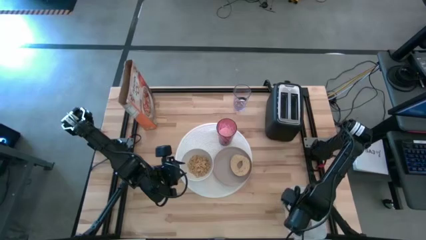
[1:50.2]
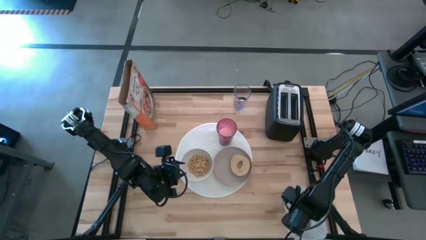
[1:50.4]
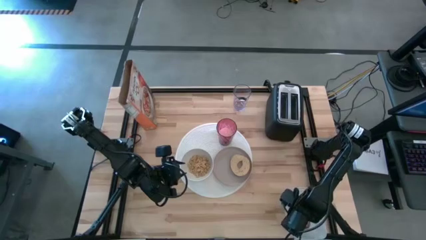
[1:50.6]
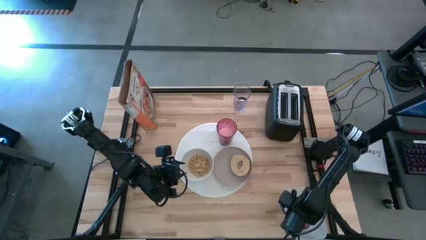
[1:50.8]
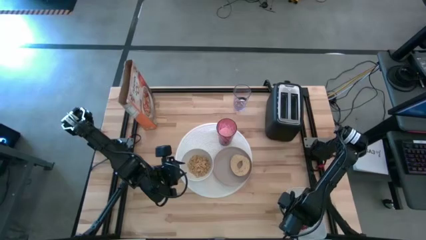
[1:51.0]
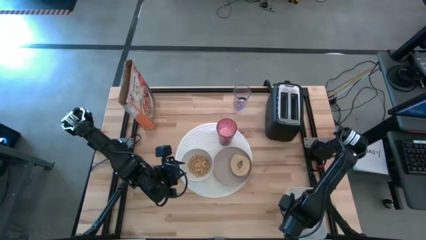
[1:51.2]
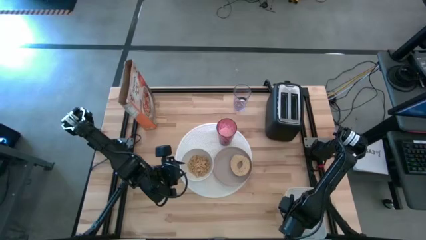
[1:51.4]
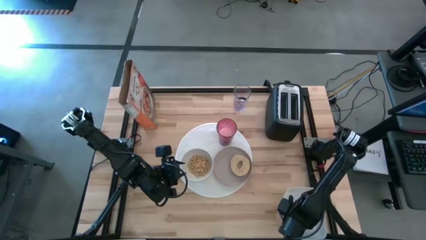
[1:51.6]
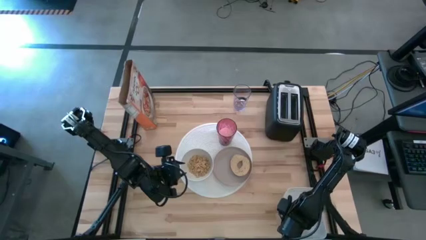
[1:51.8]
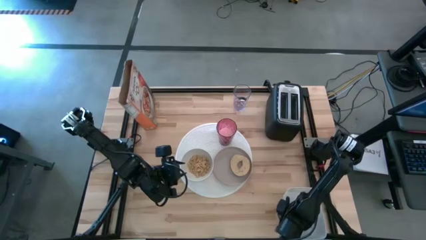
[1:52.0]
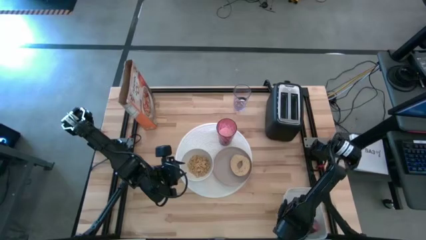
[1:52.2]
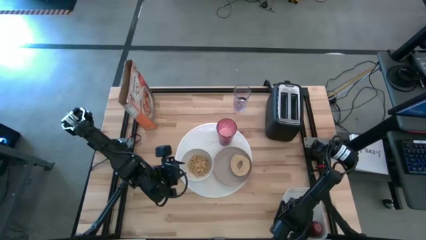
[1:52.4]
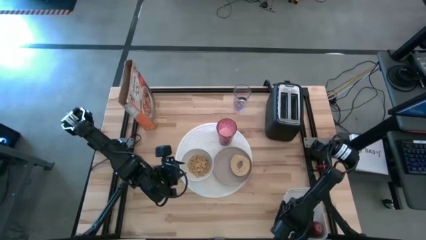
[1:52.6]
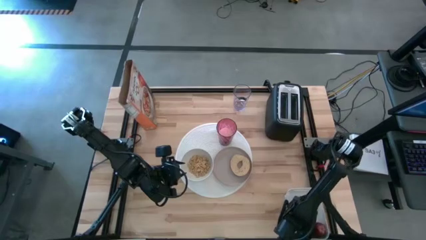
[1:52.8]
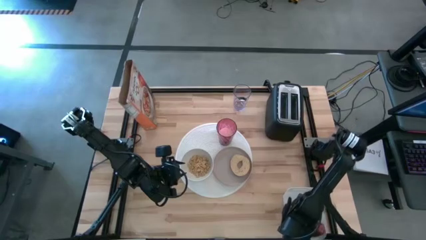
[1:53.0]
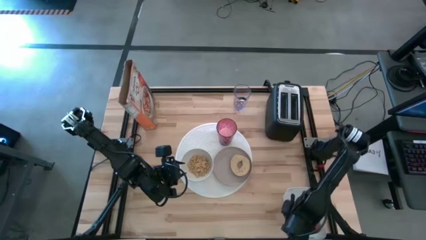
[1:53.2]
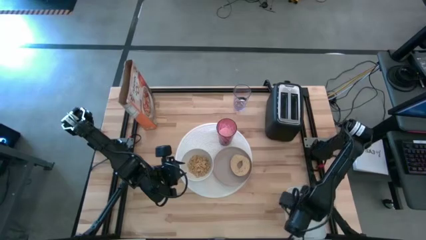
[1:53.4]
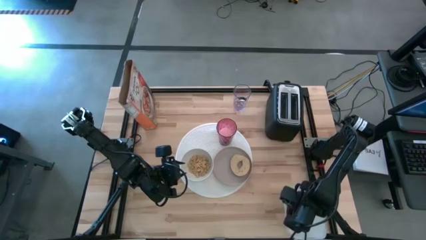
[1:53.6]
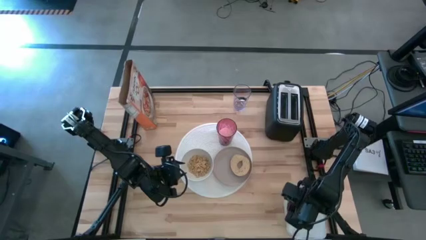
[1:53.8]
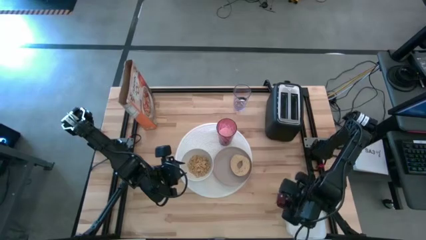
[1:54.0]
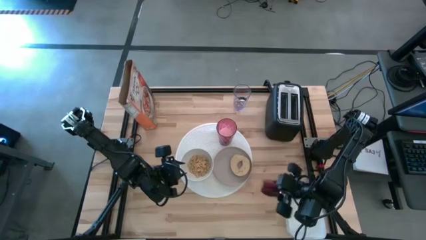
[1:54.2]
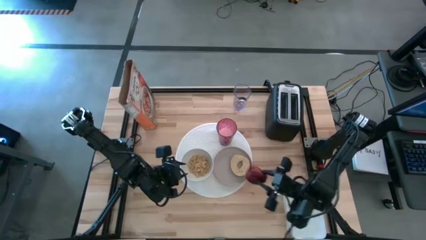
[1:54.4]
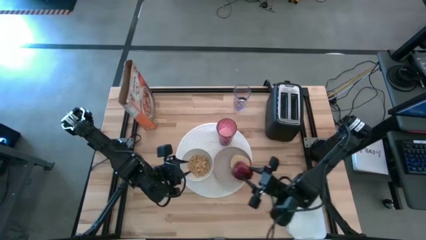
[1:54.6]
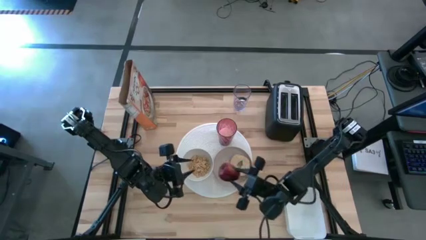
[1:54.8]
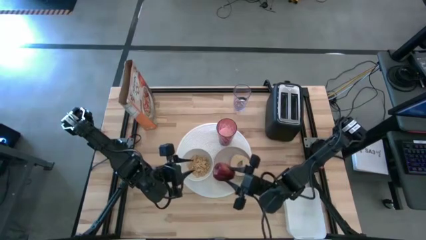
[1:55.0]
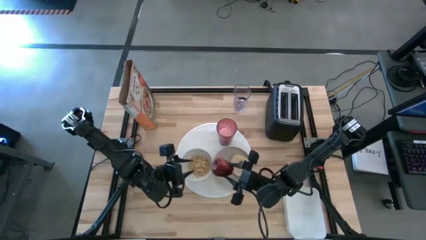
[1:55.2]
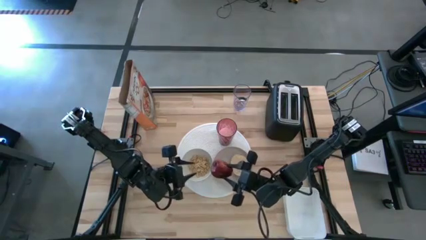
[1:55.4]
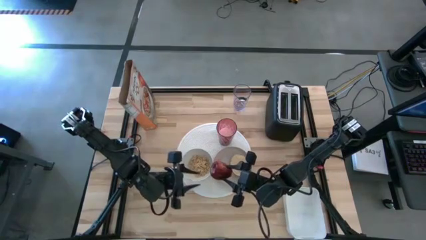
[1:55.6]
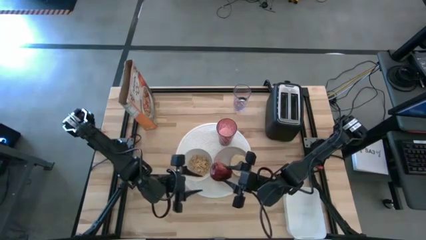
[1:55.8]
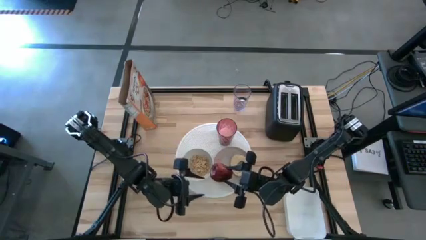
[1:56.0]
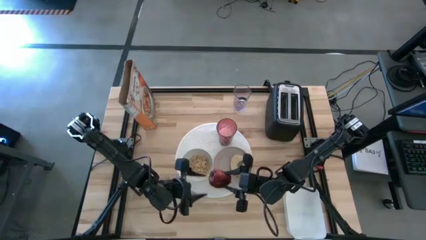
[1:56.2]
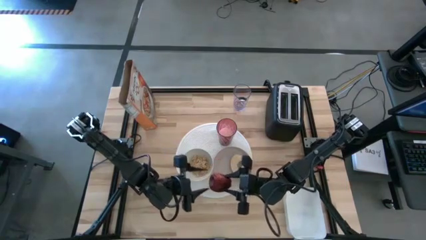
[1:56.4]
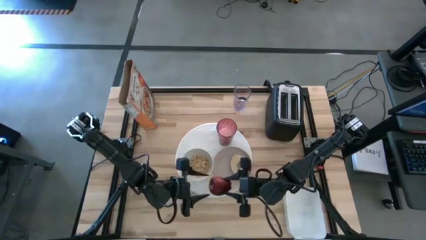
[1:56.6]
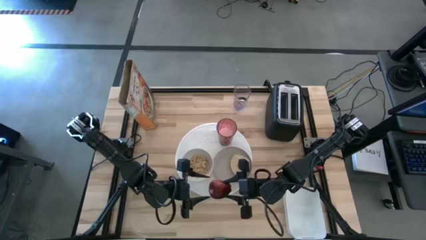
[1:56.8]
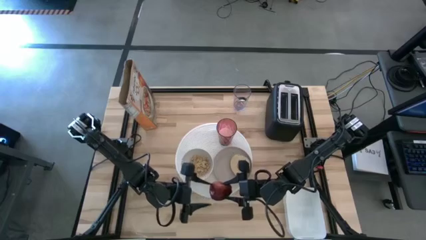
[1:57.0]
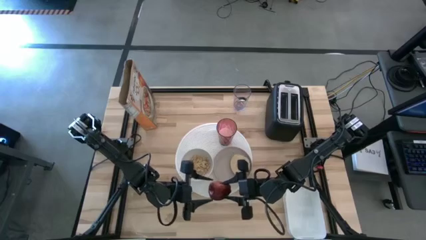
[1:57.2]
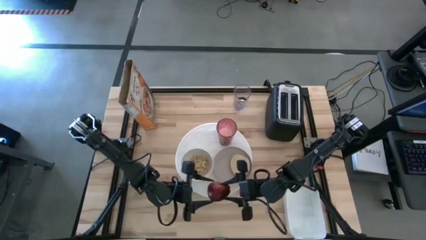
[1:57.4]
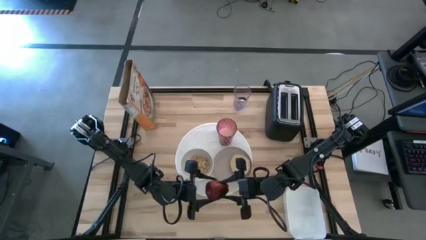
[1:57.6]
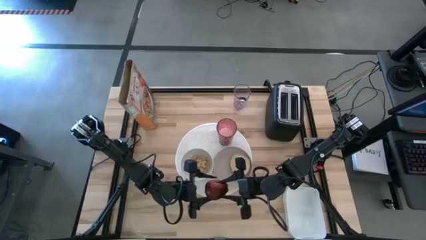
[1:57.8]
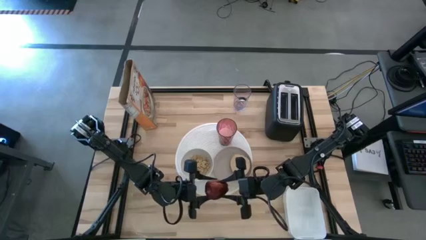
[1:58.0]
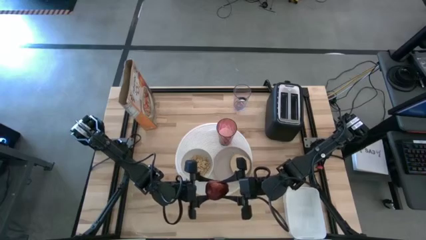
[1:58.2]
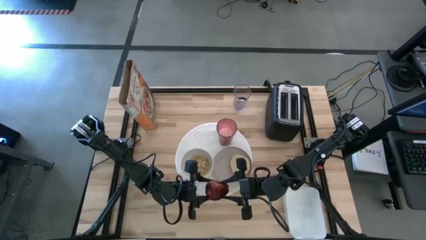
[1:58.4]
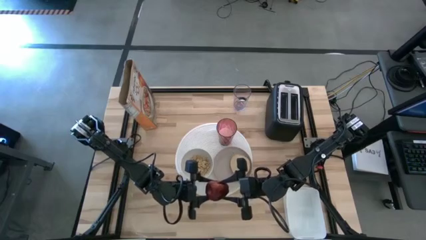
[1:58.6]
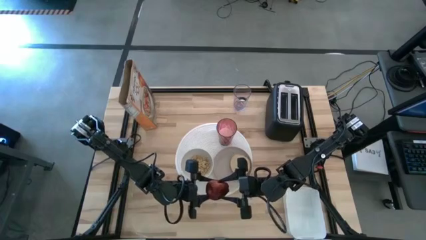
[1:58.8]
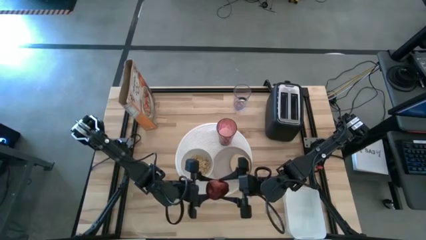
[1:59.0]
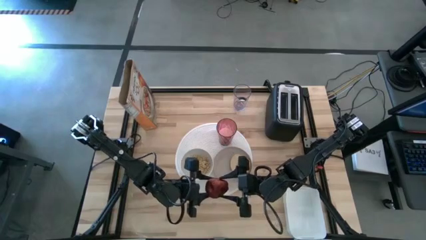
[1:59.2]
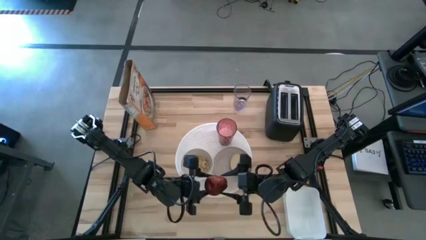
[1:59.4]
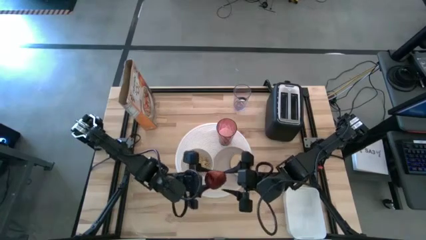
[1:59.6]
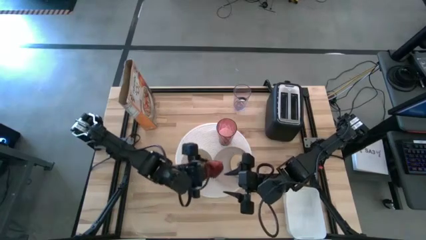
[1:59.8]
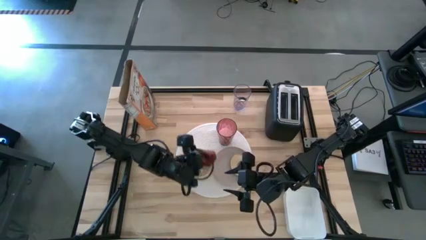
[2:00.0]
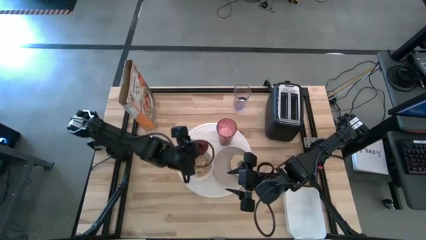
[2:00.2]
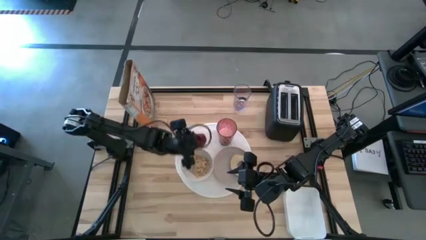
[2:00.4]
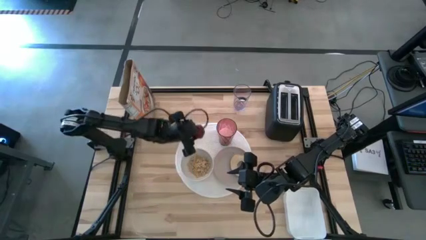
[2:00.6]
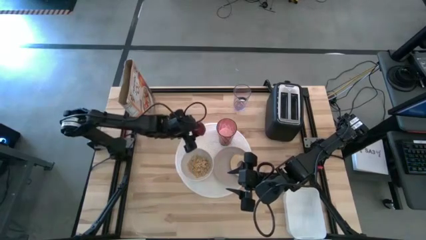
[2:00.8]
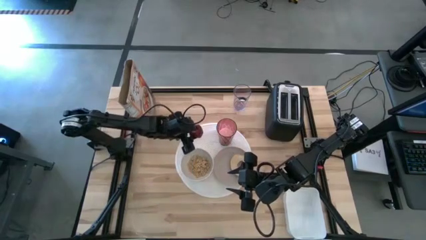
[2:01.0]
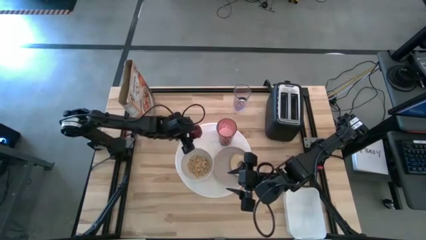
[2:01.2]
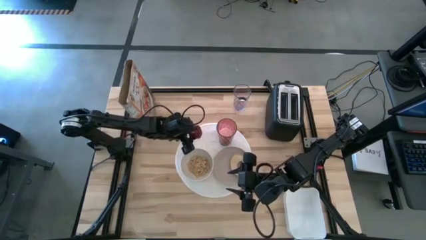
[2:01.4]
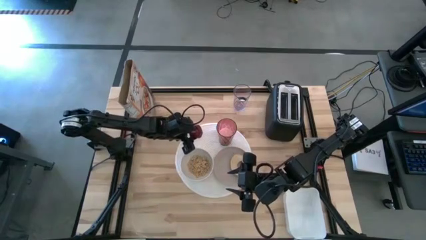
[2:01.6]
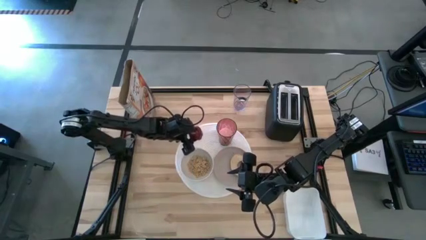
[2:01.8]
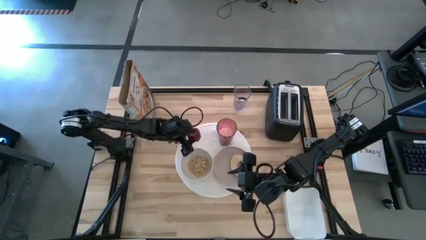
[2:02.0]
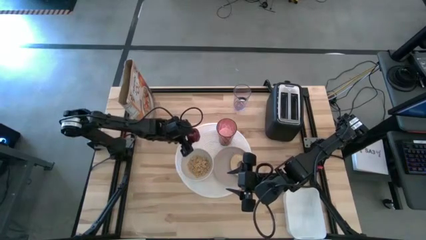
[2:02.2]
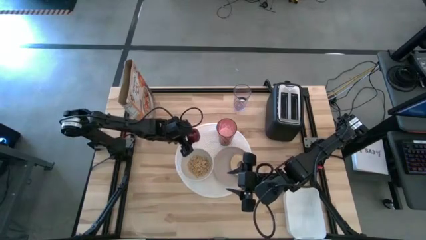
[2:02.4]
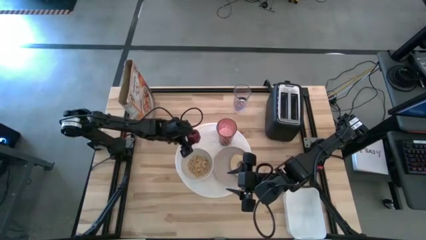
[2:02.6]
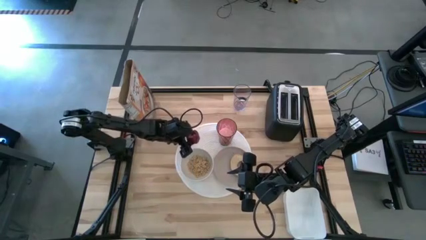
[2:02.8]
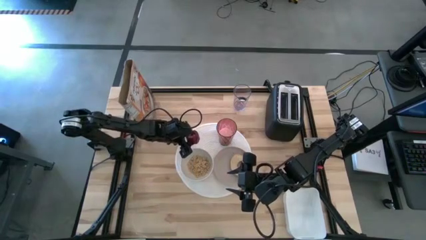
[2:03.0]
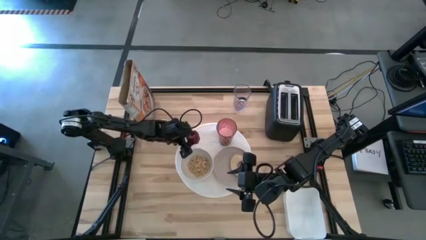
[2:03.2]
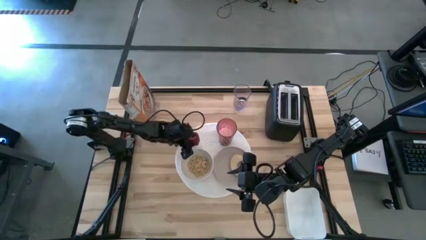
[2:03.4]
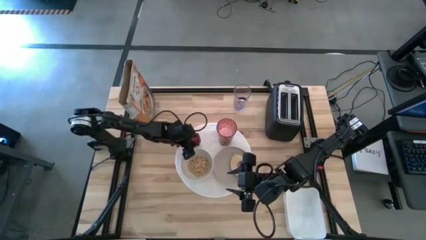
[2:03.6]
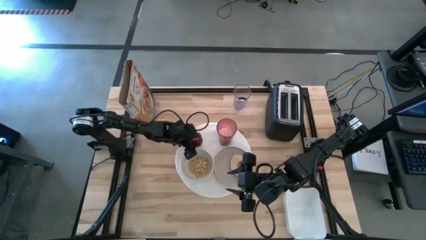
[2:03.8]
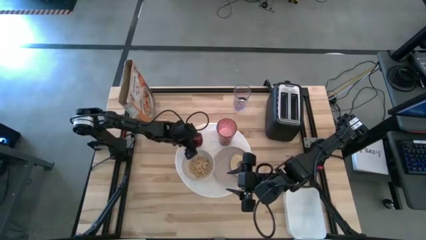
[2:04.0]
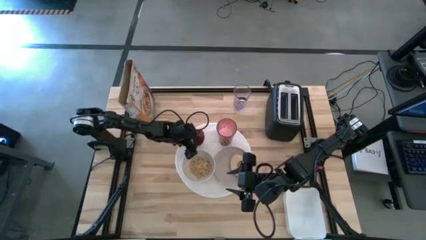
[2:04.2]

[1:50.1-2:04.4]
Task: Arrange a breakfast setting
Put the red apple on the white table mat to the left of the red glass

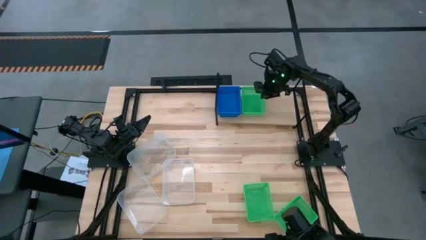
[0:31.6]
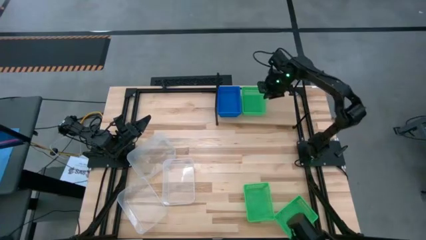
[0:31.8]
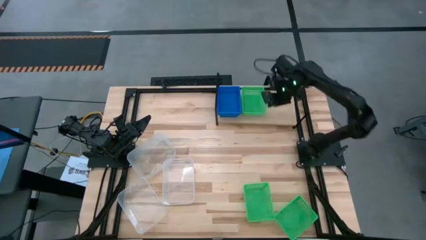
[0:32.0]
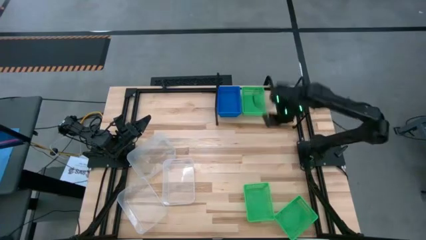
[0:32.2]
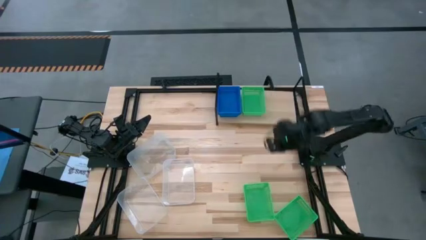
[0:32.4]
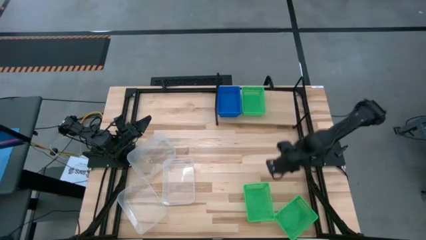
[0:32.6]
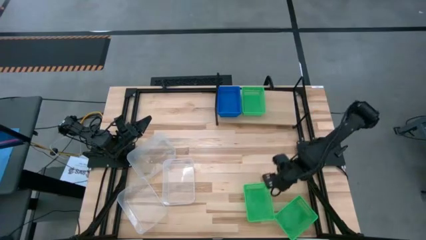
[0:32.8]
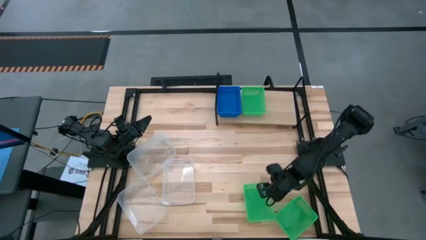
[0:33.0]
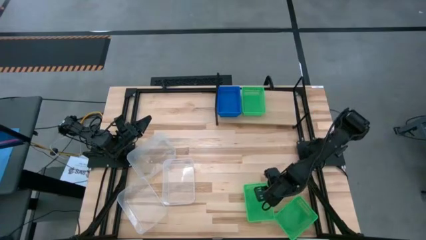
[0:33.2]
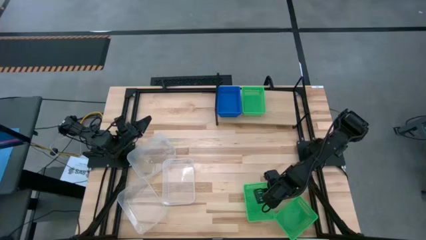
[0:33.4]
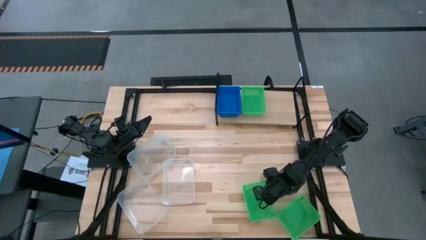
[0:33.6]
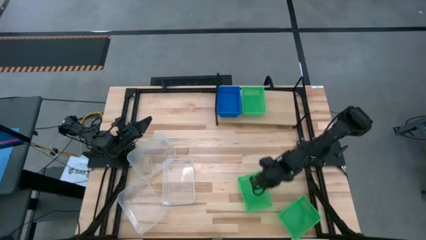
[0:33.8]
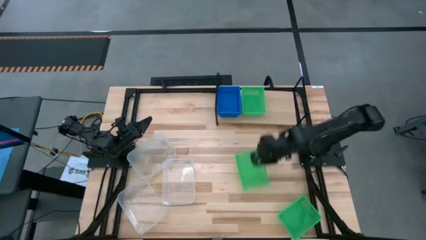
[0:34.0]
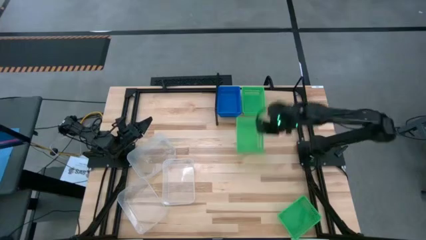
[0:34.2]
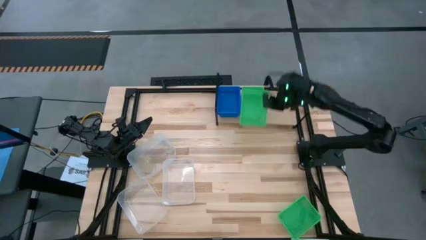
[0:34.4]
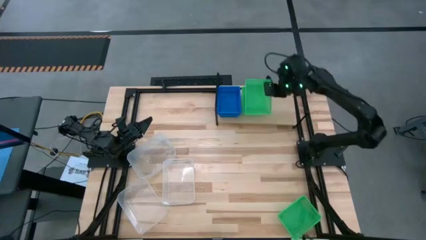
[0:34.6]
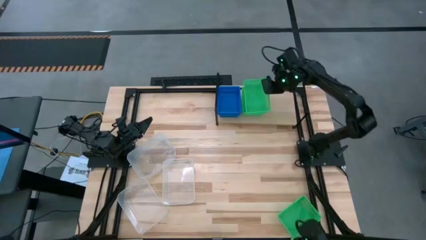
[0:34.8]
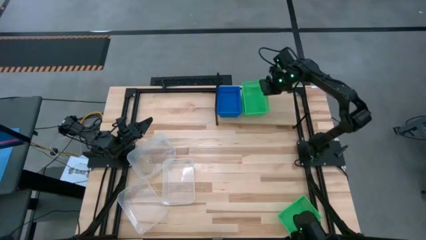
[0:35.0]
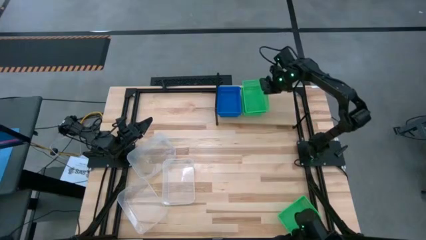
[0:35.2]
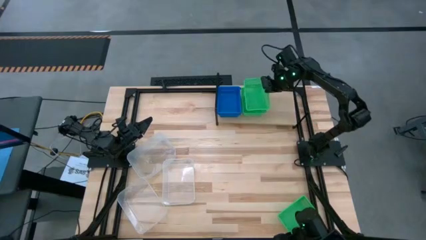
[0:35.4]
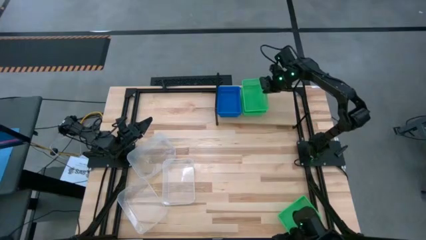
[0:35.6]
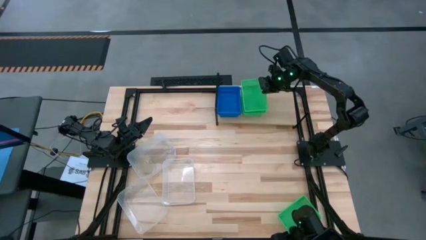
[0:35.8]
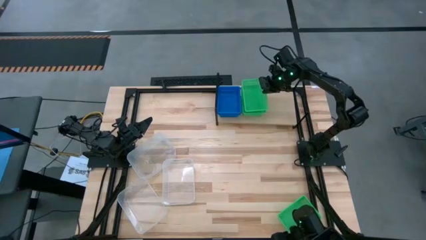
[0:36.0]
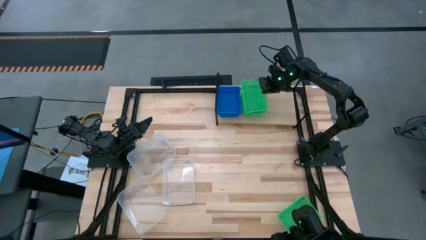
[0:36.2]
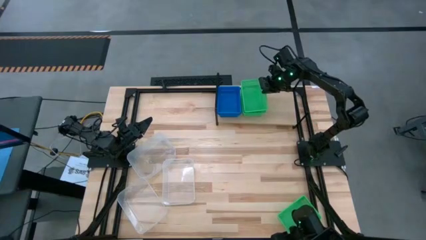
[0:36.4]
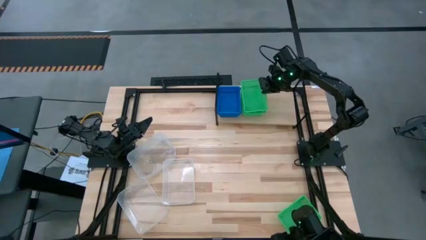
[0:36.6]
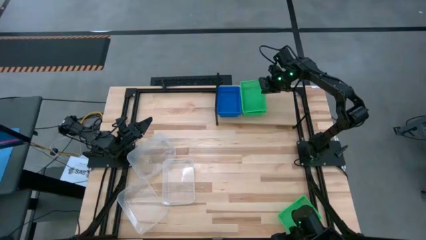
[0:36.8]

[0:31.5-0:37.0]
Task: Stack baskets on shelf by color
Stack the left green bin on top of the green bin on the shelf
